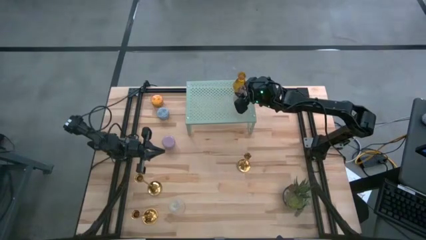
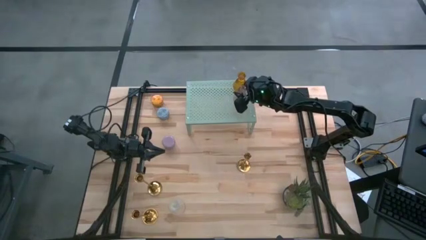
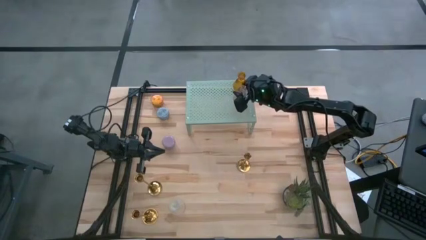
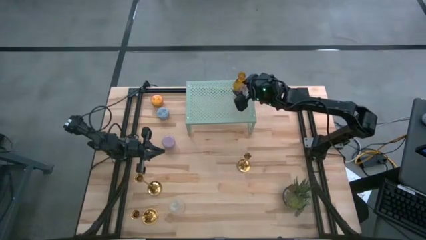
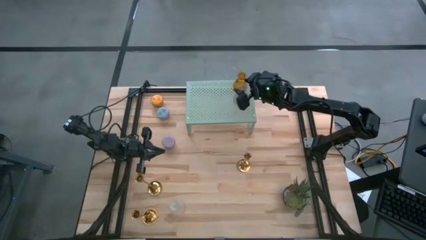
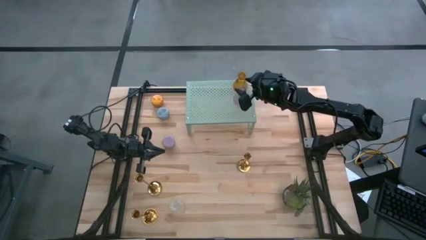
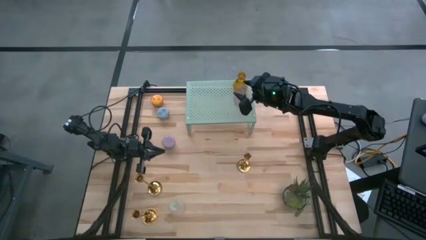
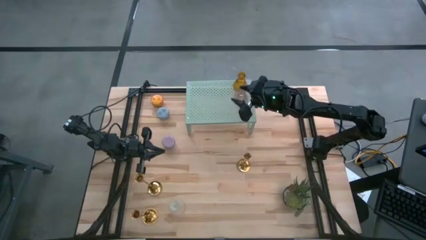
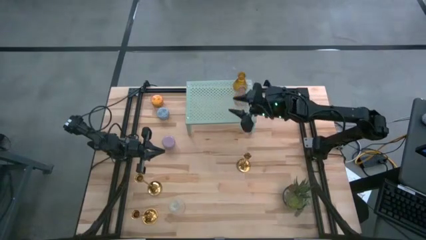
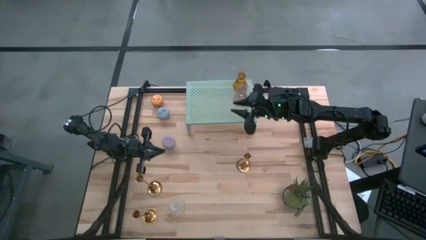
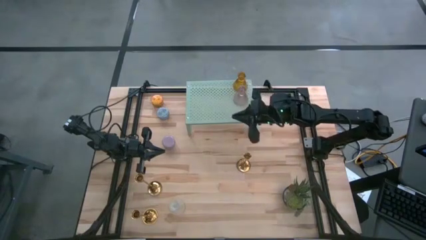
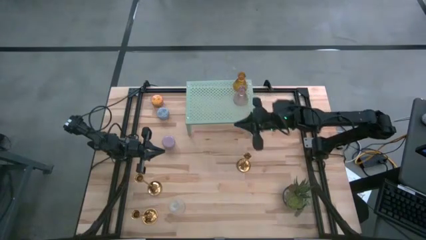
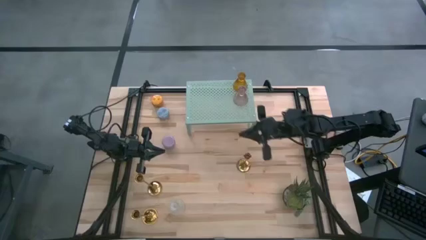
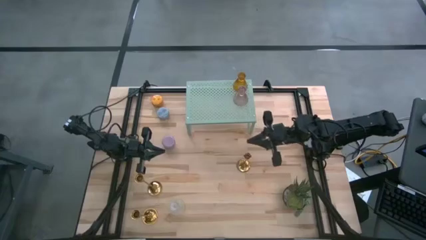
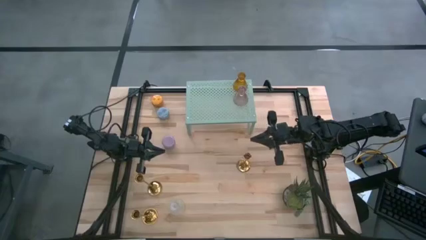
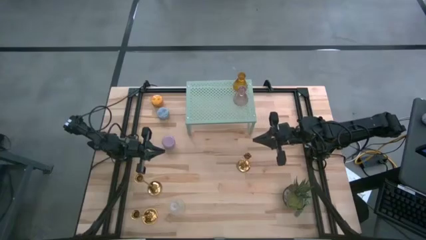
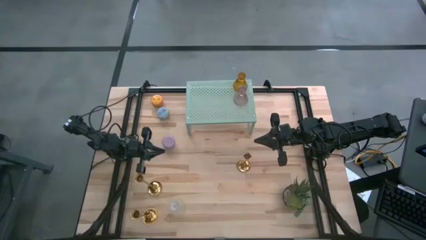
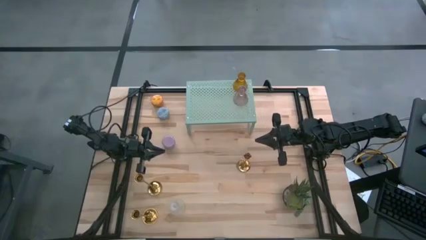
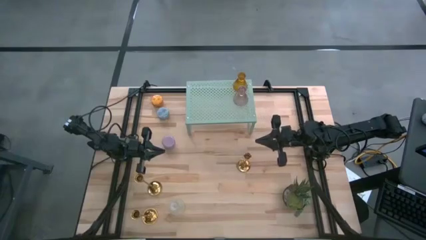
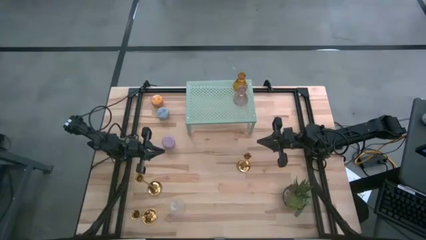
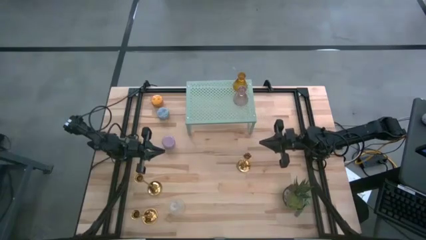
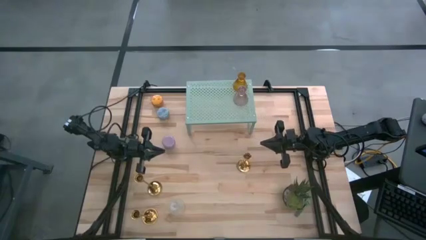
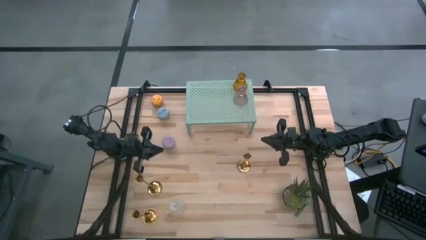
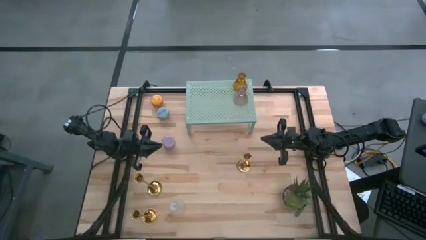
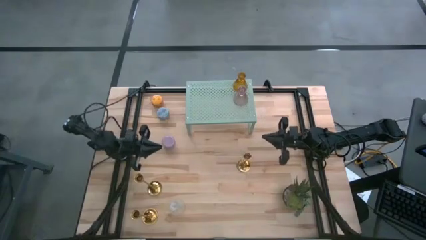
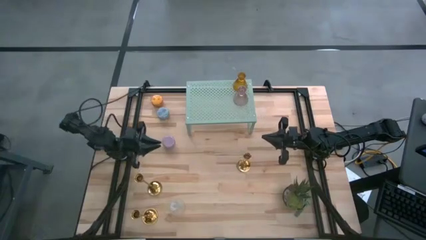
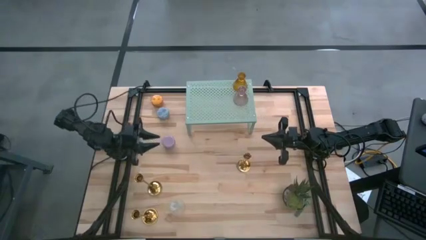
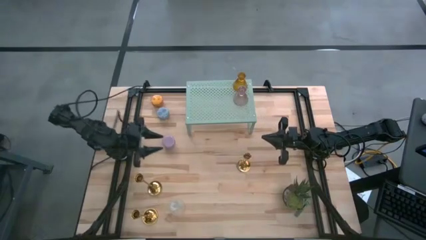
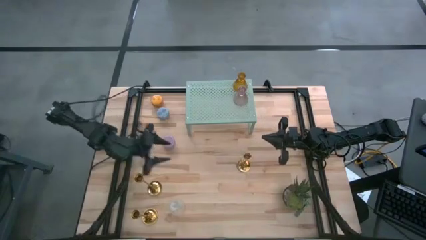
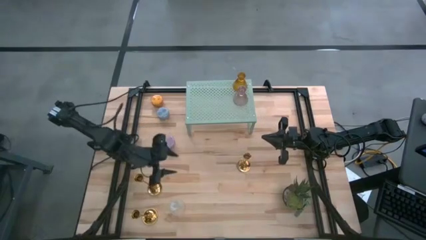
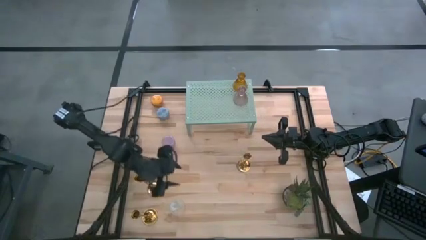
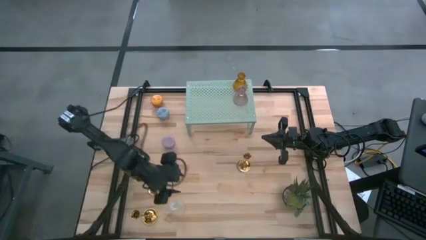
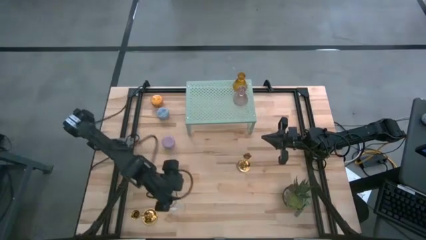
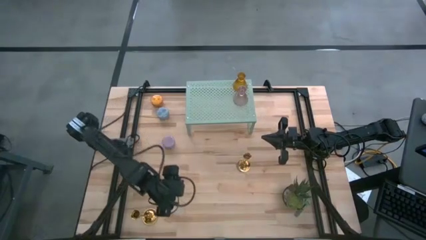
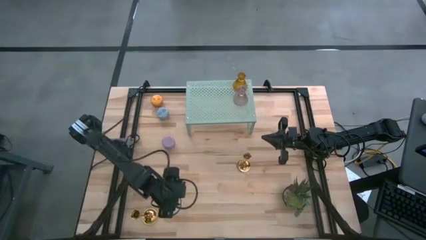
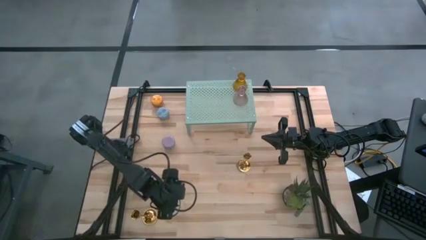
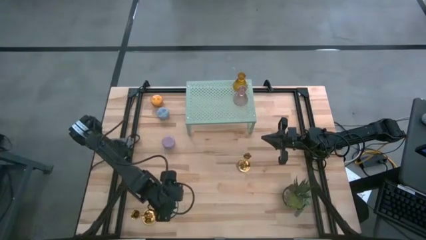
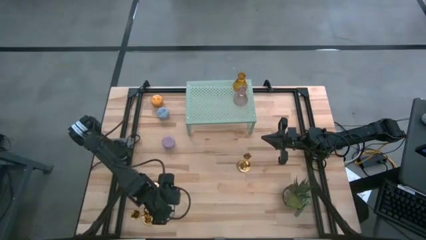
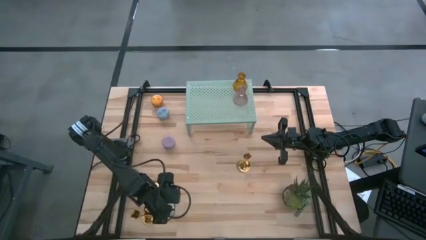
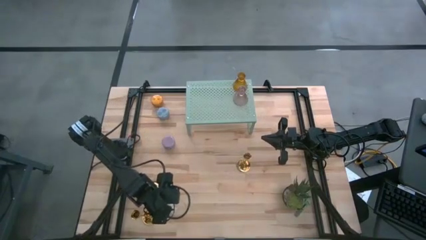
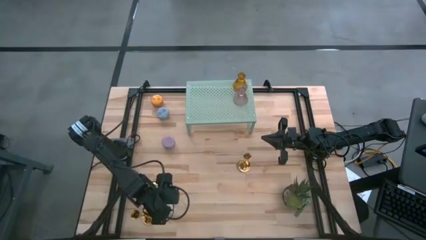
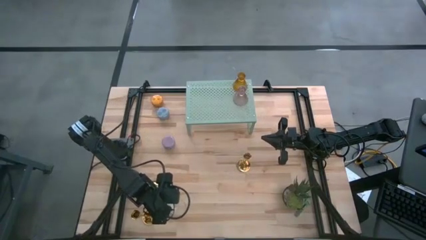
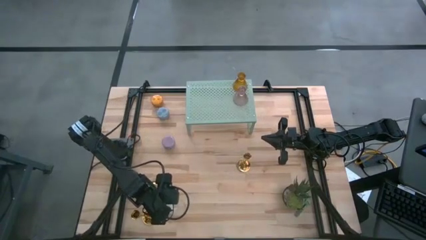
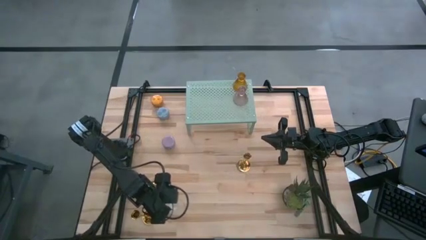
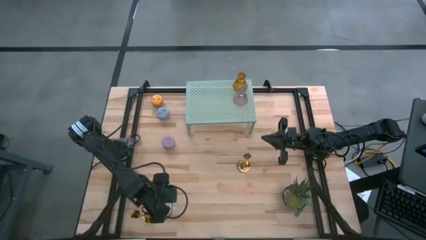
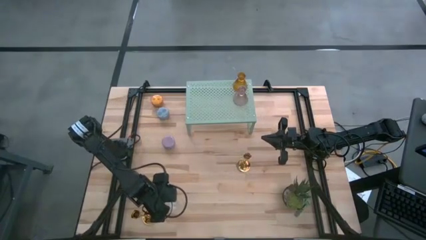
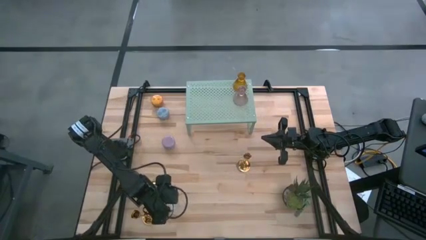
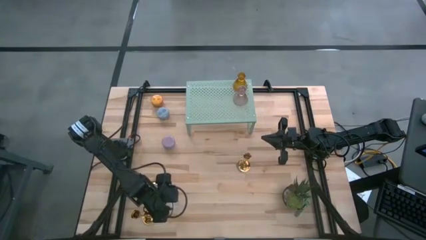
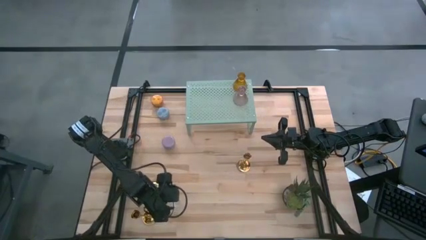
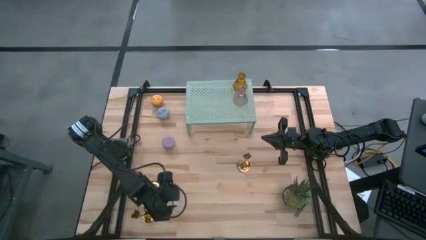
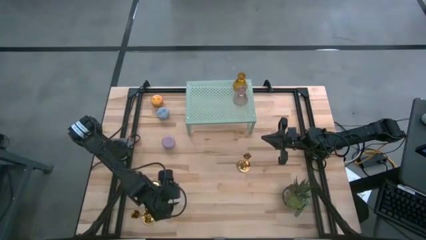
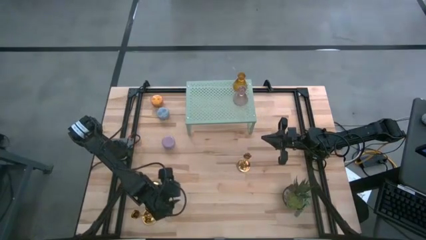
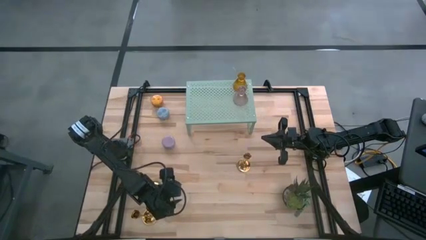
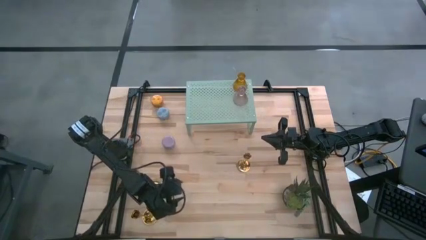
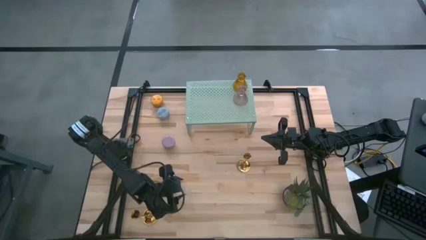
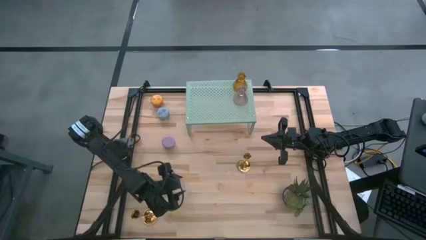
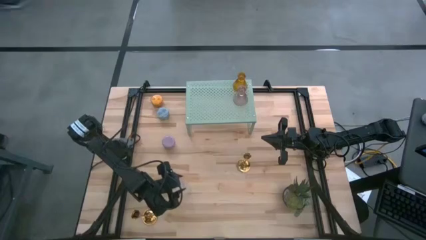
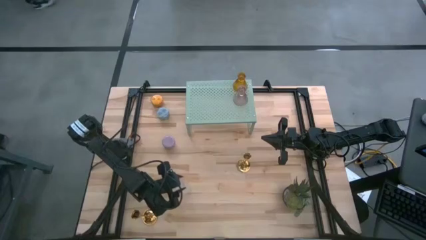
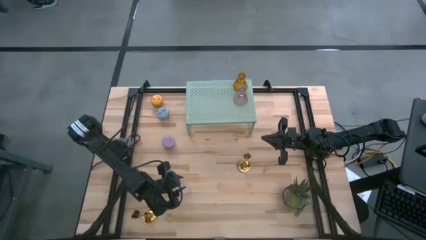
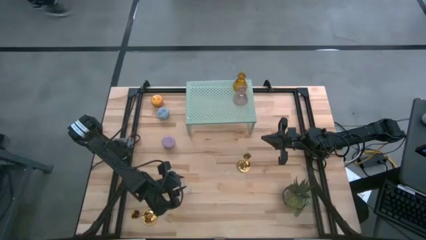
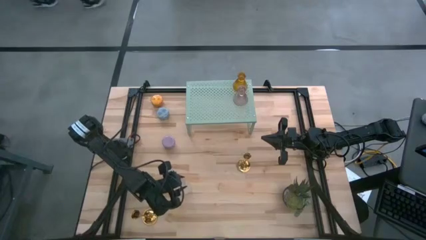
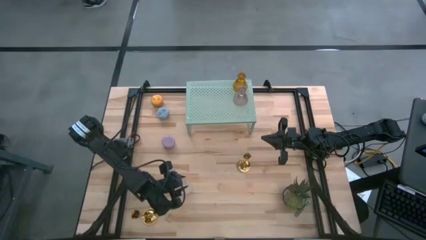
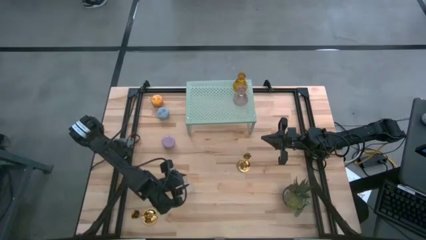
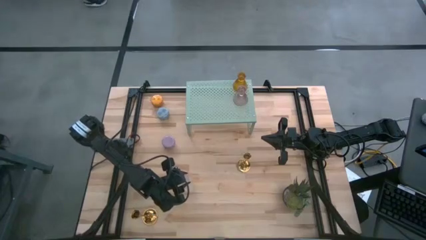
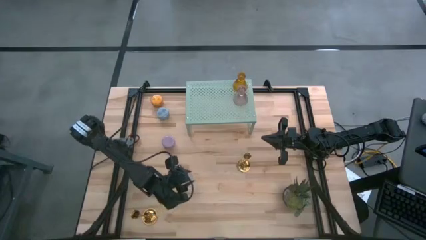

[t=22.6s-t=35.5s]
Task: Pick & Place candle stick holders
Put the transparent candle holder on the shelf

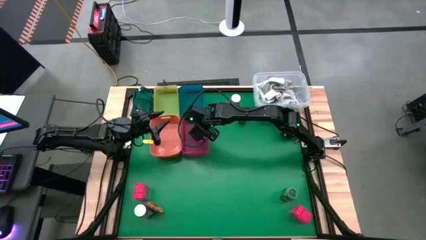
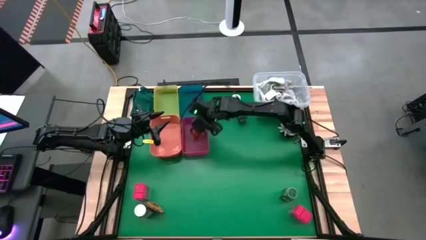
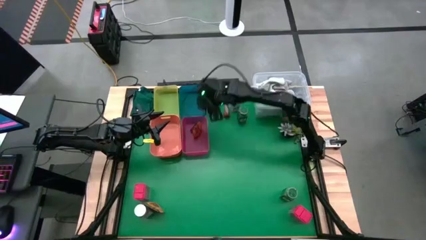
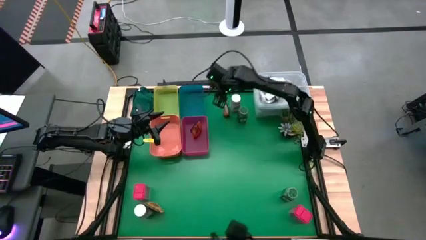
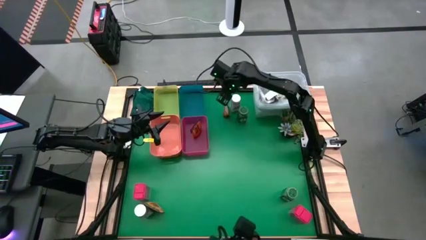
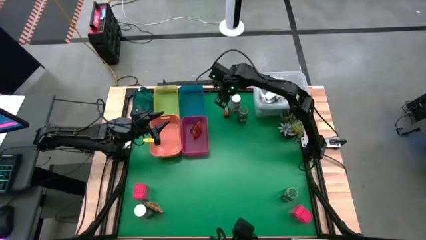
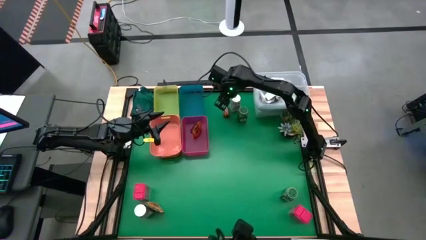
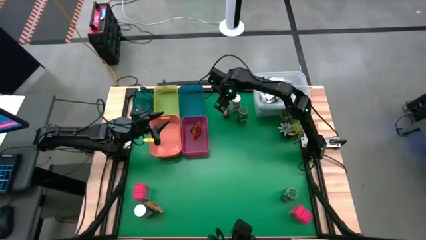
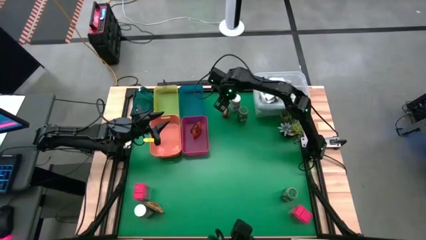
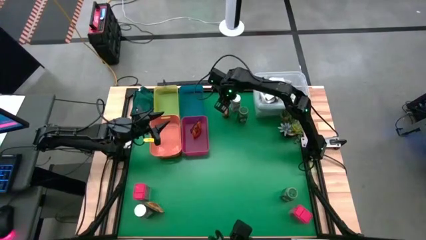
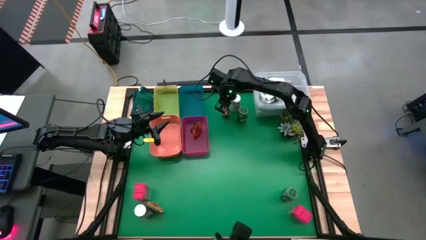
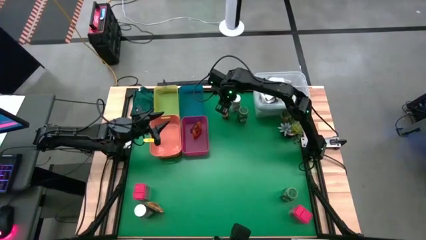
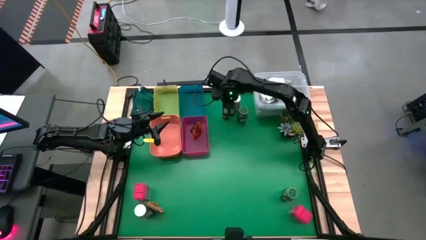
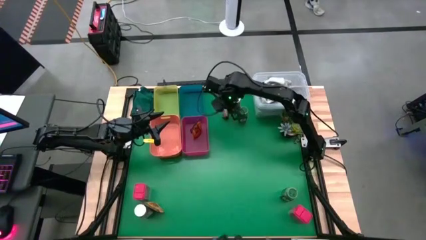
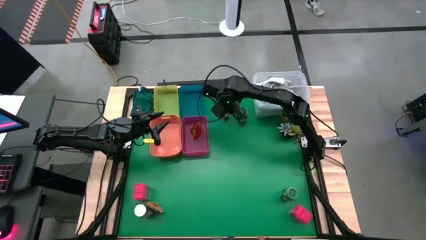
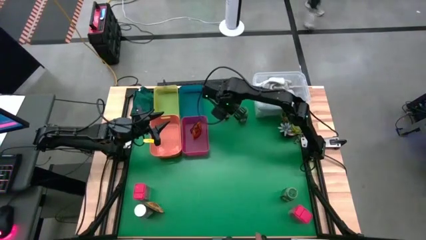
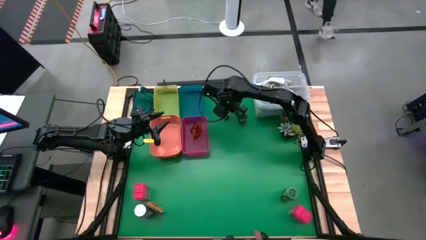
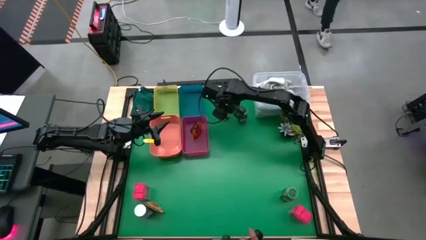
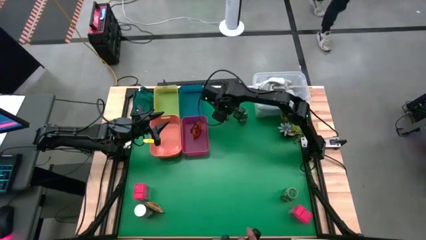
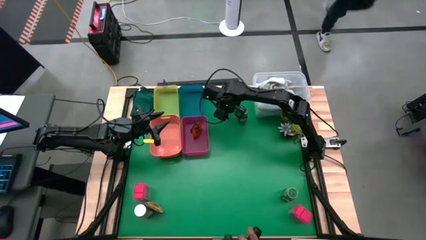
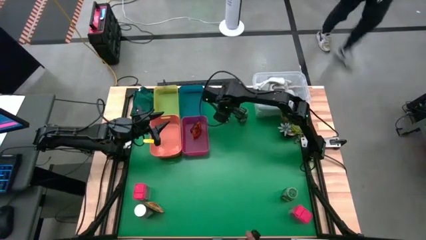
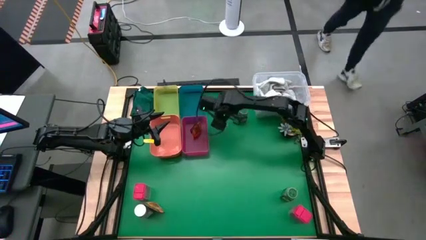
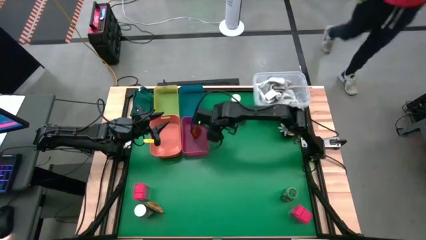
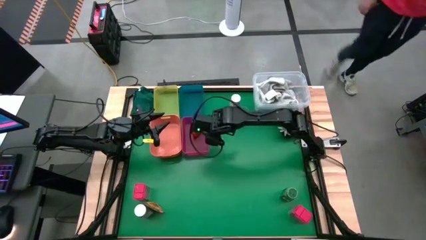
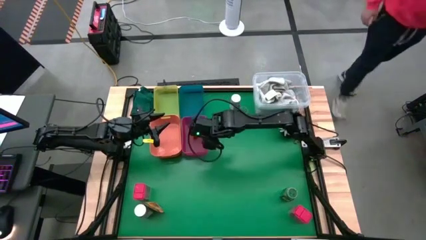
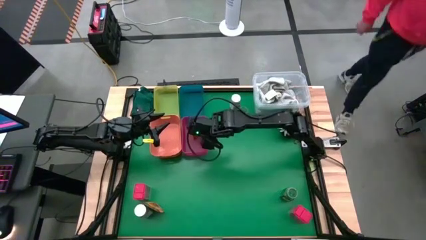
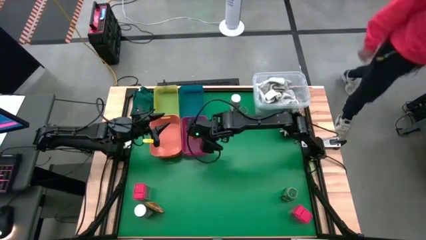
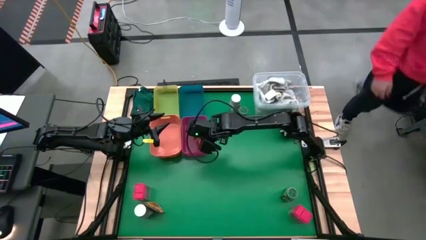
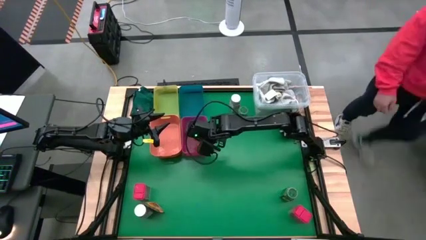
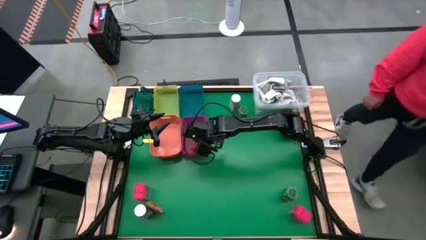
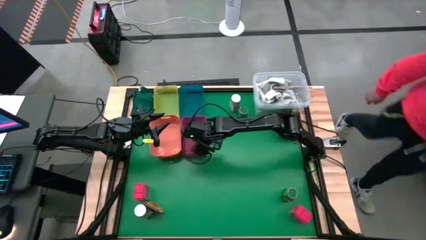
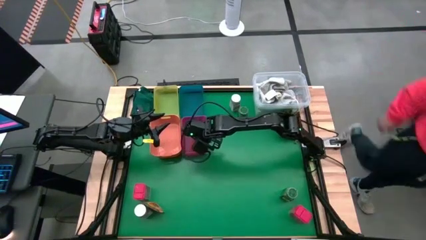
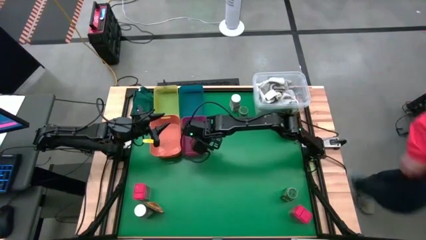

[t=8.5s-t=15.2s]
Task: Sort spices by type
Put the top orange seasoning pack into the light red bin
